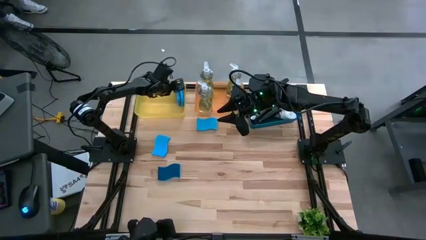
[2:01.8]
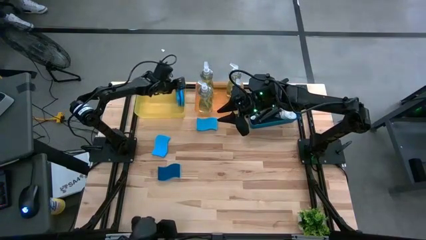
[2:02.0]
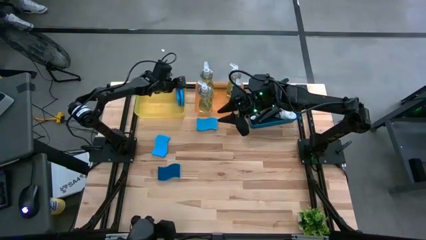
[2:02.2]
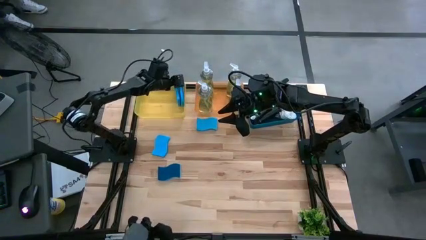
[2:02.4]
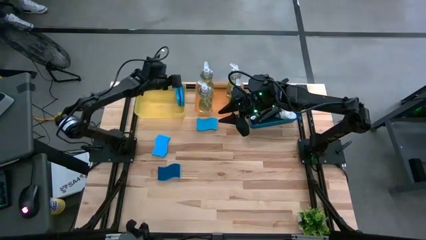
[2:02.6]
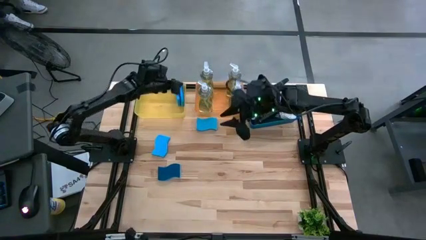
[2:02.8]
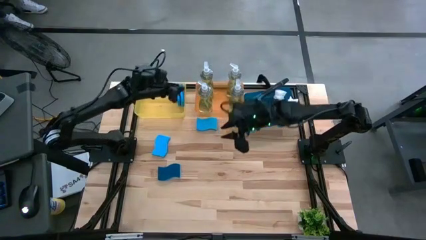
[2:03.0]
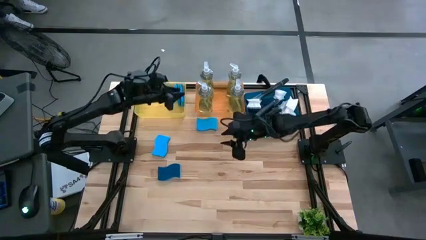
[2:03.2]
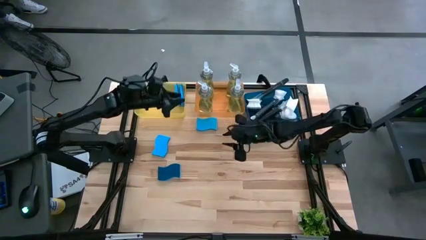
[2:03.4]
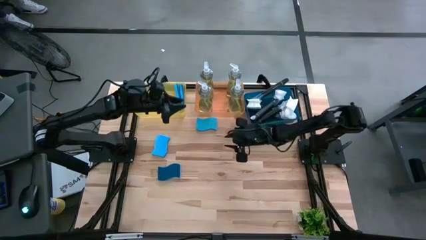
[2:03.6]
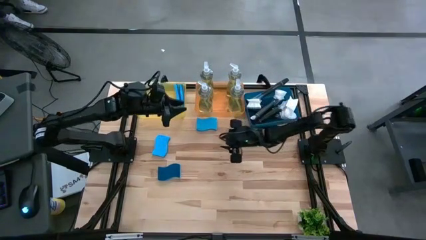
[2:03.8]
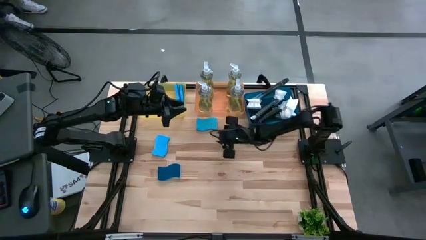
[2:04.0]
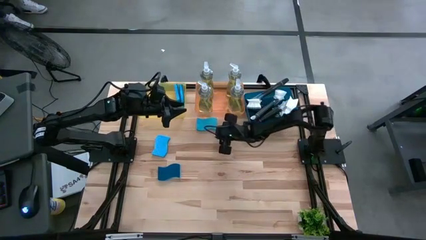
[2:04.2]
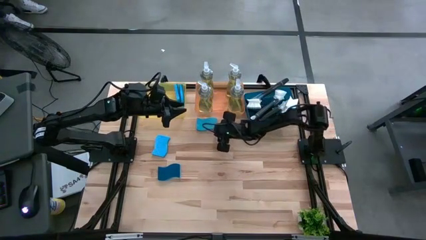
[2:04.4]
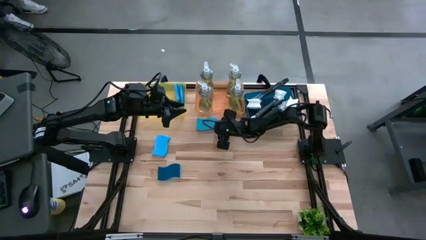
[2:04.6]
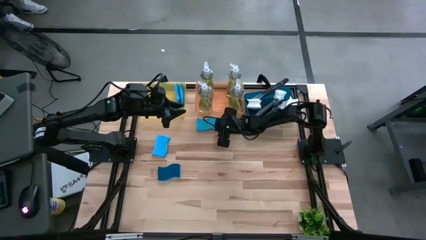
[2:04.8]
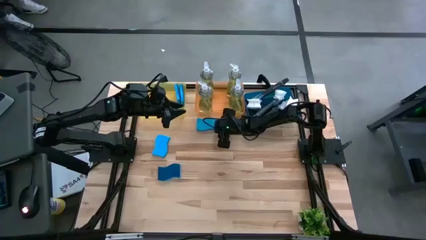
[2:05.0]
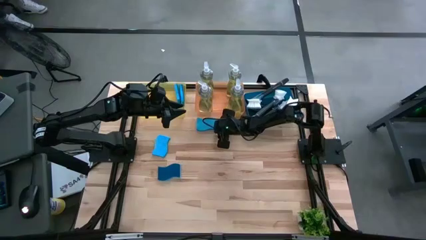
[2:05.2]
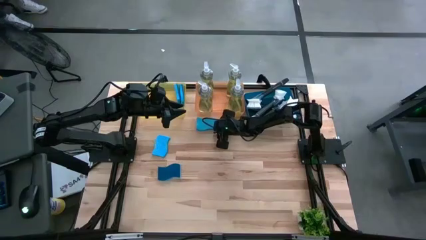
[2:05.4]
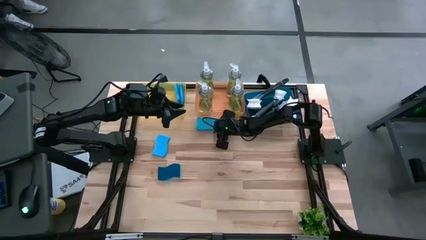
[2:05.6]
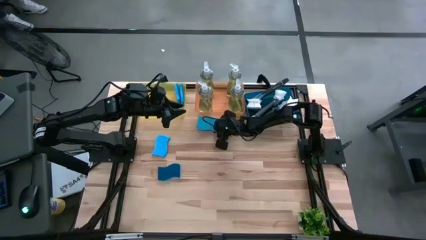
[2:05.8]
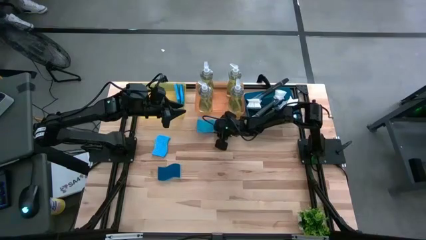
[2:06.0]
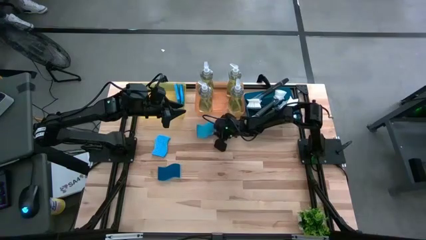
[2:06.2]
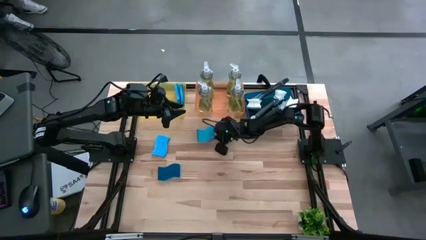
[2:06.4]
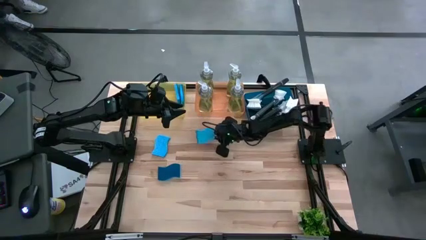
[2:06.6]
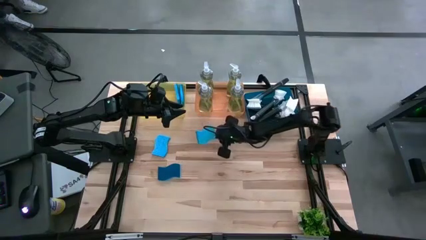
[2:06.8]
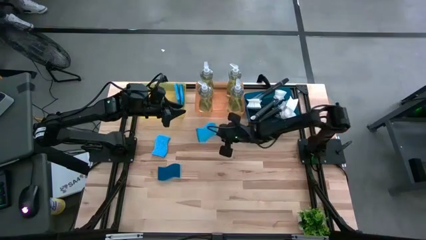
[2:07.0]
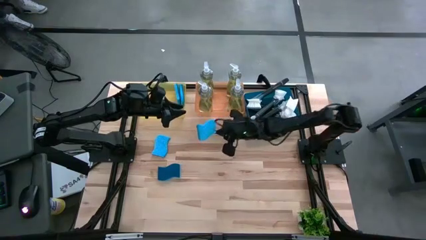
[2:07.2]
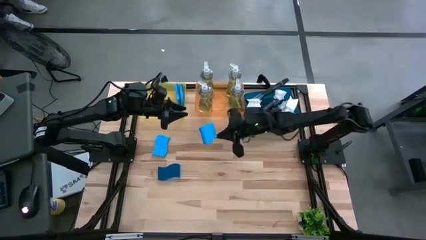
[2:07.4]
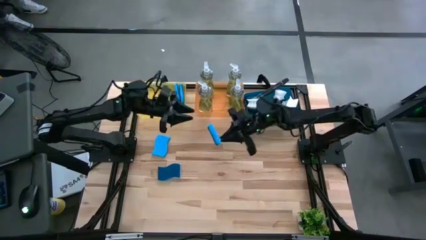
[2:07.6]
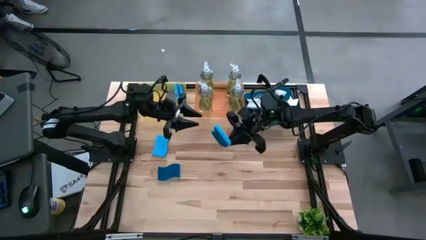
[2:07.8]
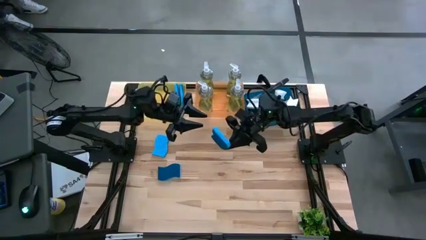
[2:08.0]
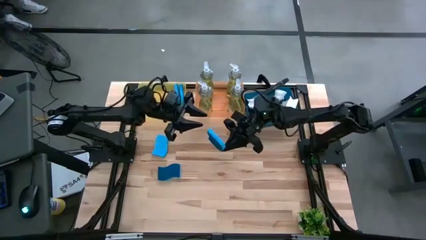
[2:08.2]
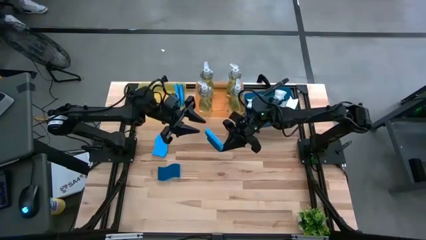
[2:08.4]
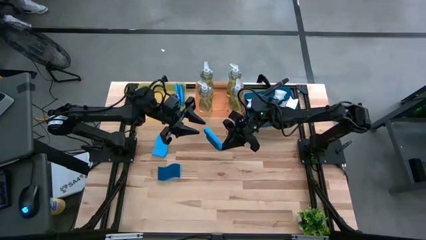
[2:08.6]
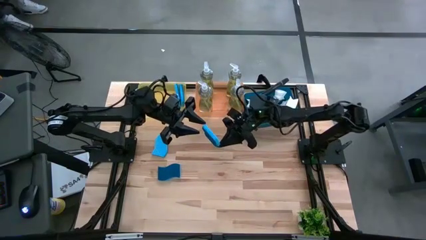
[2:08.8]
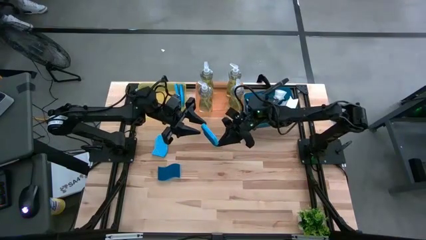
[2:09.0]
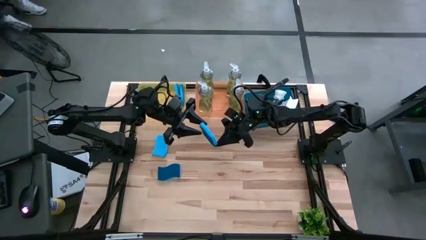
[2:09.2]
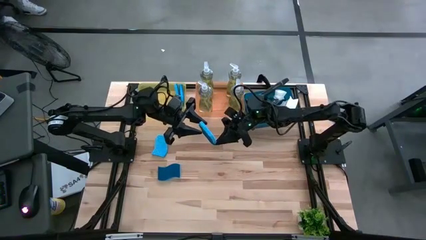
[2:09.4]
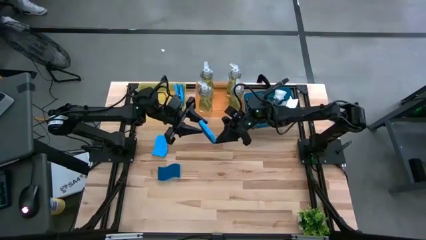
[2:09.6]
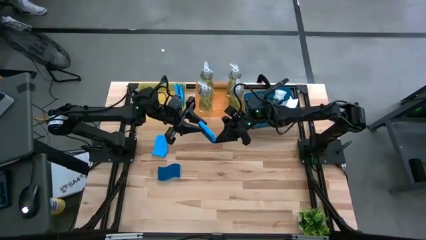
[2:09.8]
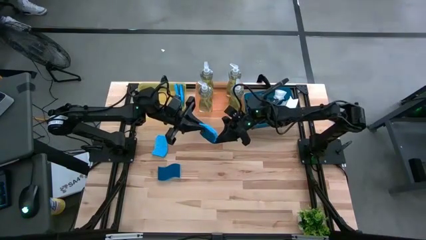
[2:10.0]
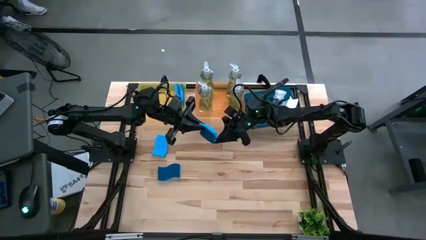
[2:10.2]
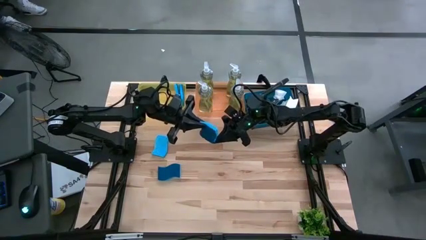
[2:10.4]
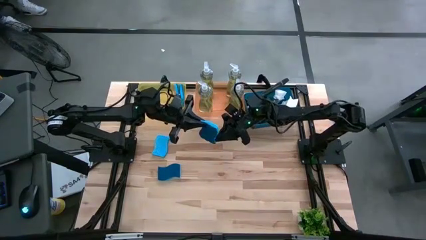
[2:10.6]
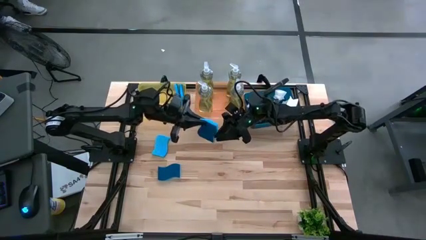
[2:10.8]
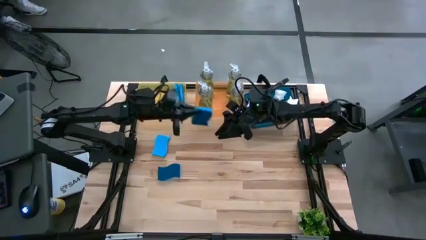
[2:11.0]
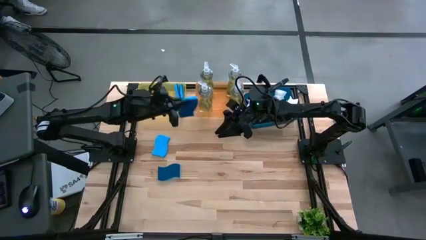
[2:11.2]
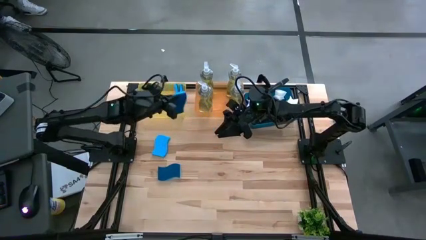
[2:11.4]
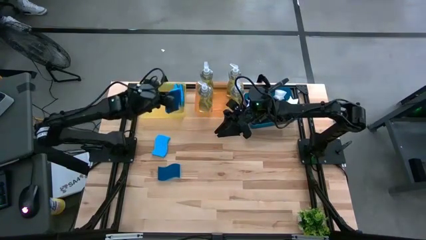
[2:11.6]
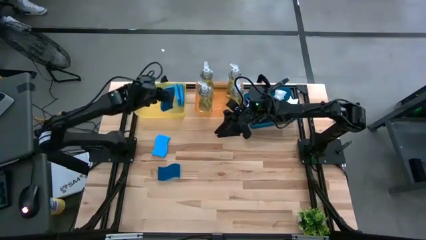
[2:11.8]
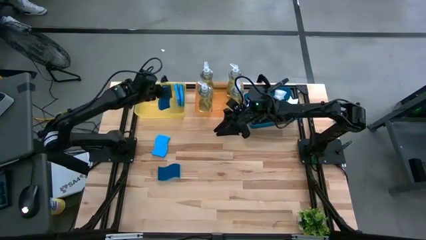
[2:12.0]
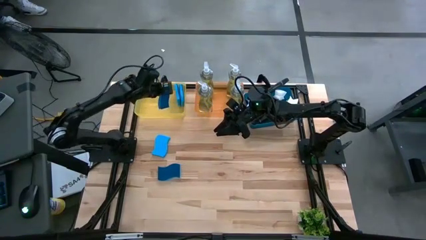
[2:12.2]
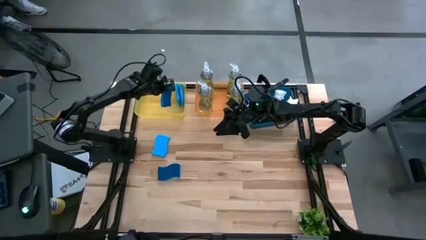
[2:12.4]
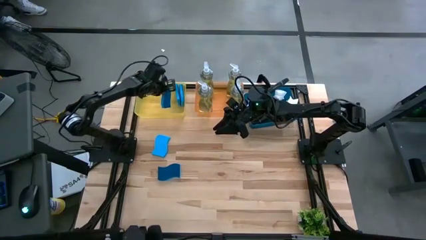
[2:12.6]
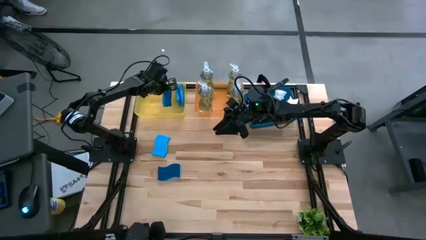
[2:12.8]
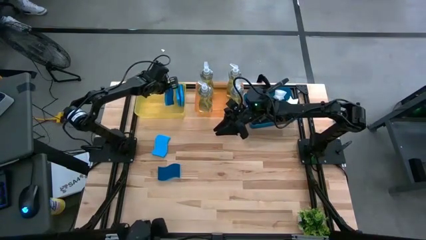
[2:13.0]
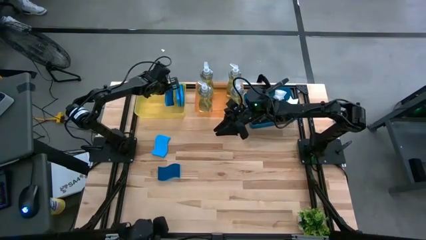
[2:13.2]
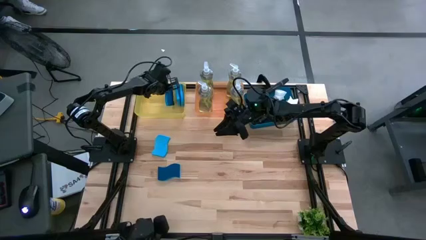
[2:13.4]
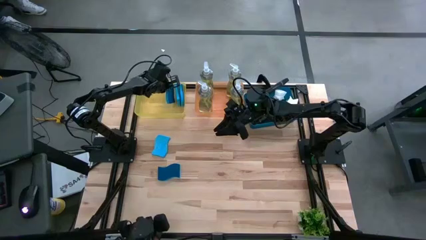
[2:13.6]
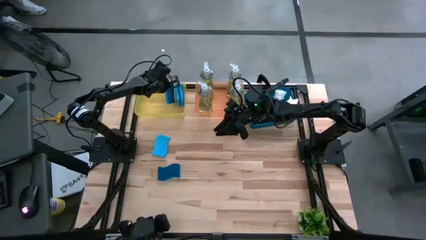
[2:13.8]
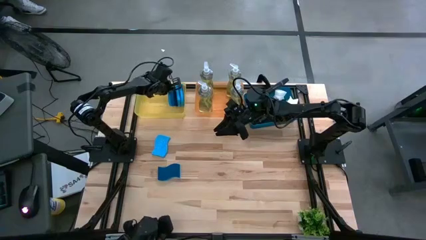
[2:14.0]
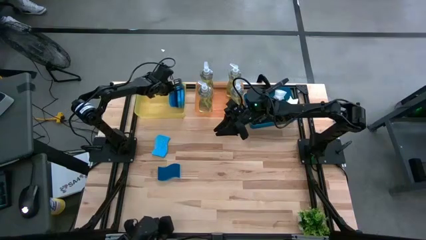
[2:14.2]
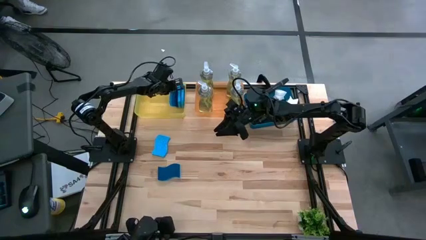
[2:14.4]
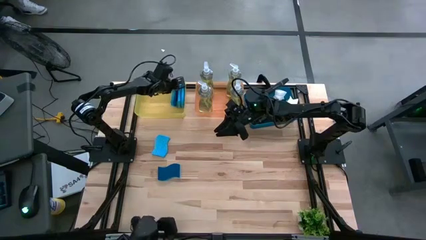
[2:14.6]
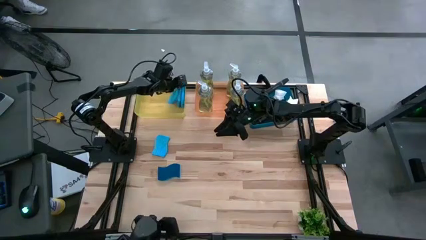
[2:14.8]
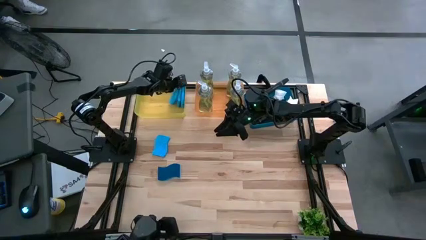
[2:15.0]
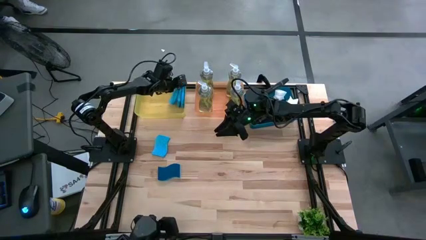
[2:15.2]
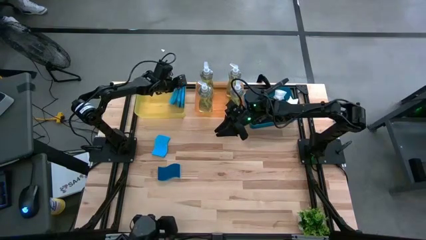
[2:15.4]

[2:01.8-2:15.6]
Task: Pick & Place Kitchen Sink Supplies
Put the blue sponge into the yellow bin
